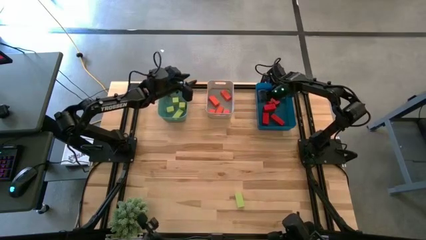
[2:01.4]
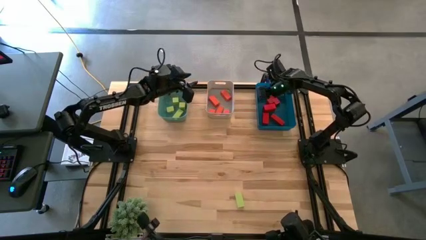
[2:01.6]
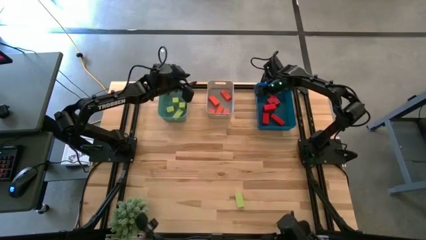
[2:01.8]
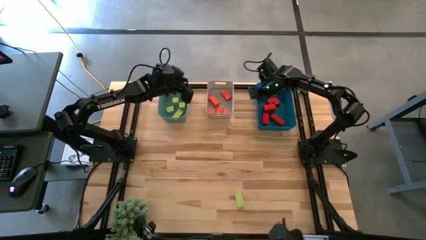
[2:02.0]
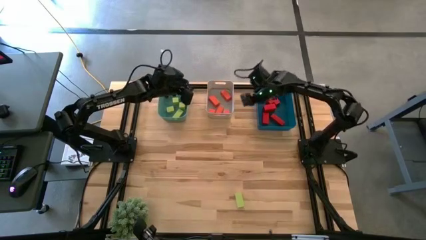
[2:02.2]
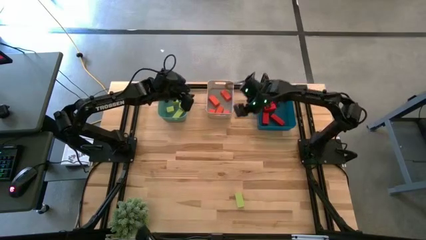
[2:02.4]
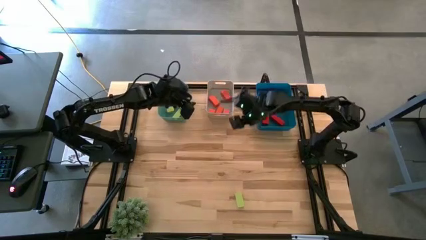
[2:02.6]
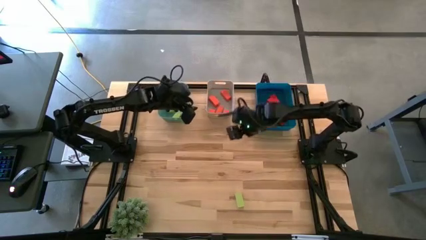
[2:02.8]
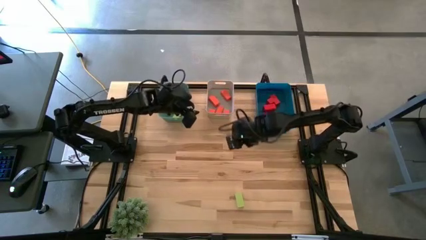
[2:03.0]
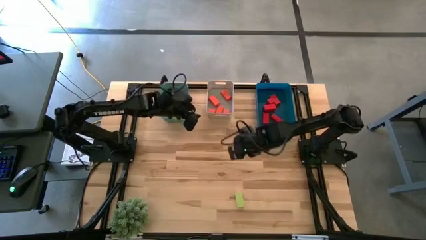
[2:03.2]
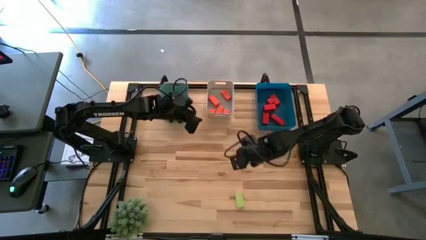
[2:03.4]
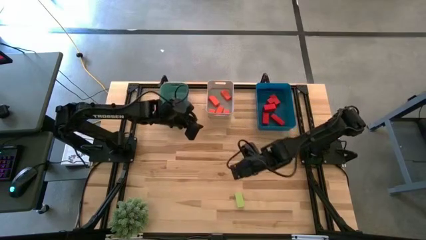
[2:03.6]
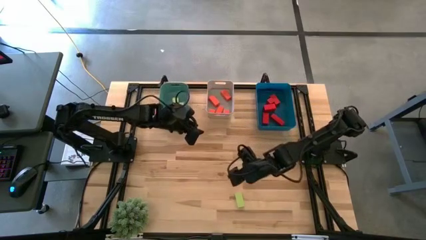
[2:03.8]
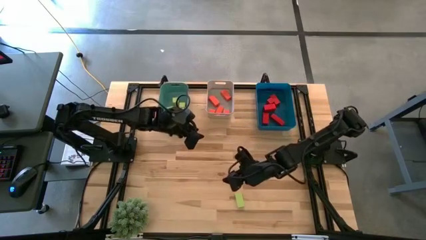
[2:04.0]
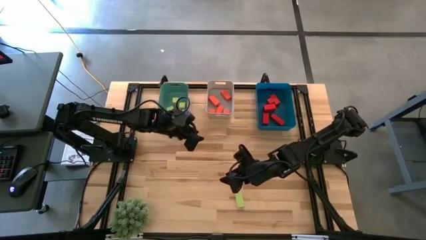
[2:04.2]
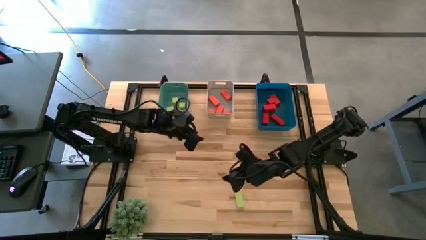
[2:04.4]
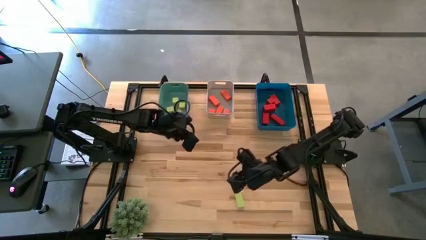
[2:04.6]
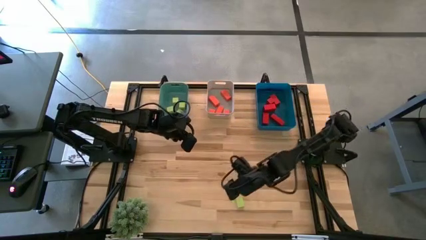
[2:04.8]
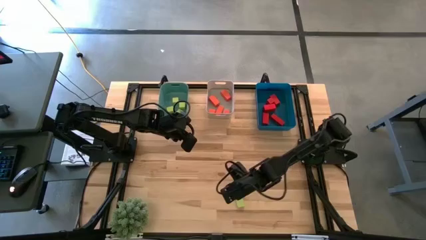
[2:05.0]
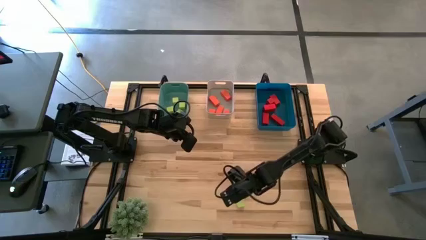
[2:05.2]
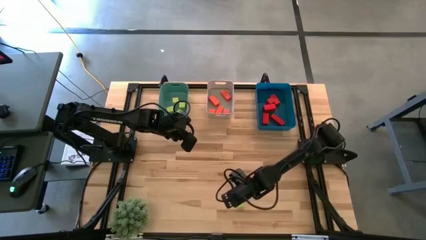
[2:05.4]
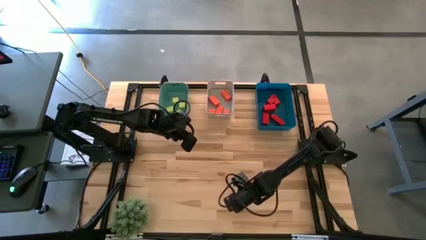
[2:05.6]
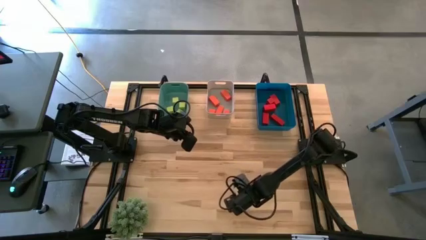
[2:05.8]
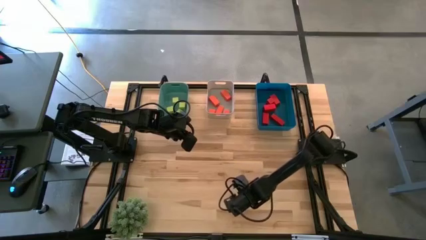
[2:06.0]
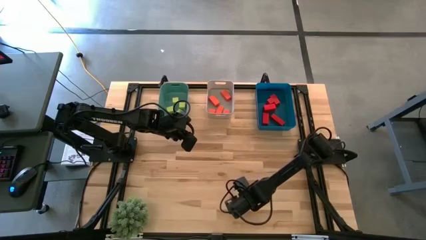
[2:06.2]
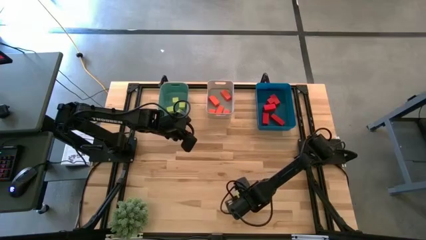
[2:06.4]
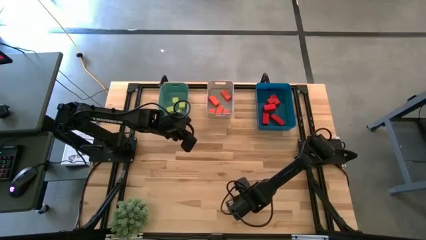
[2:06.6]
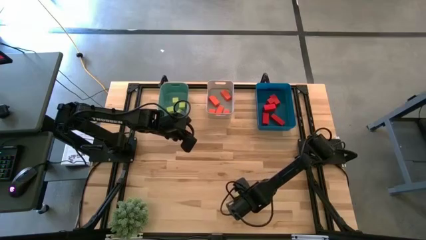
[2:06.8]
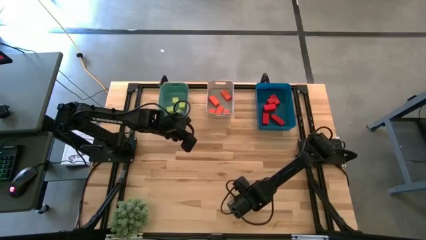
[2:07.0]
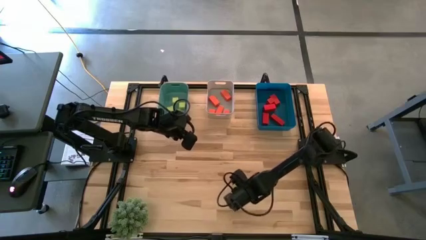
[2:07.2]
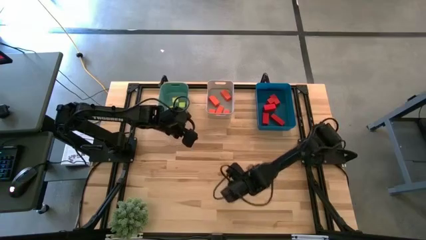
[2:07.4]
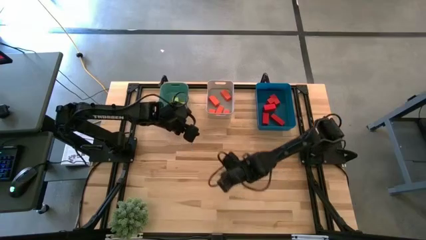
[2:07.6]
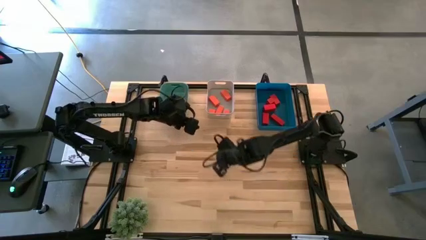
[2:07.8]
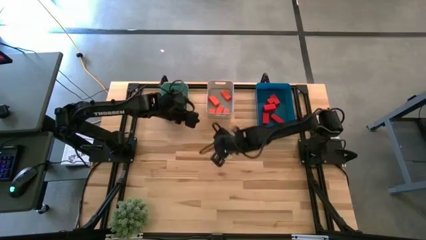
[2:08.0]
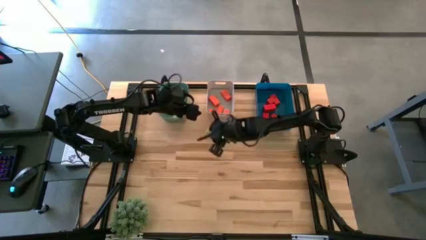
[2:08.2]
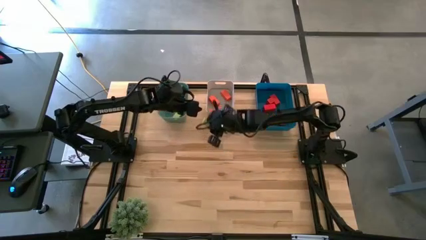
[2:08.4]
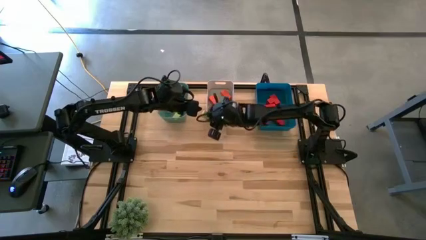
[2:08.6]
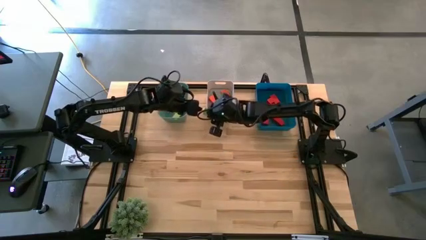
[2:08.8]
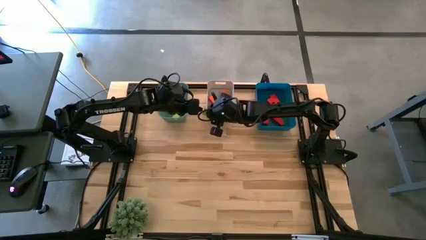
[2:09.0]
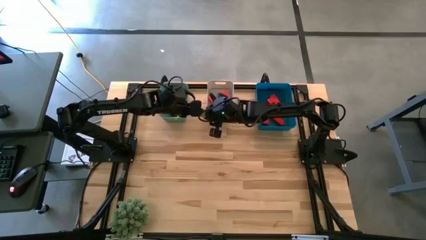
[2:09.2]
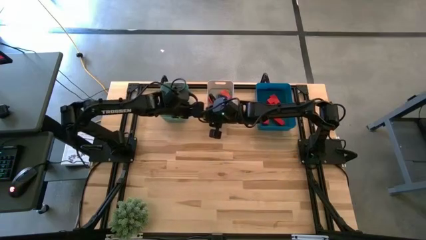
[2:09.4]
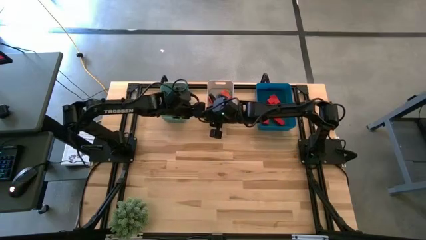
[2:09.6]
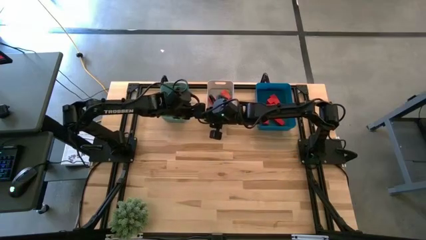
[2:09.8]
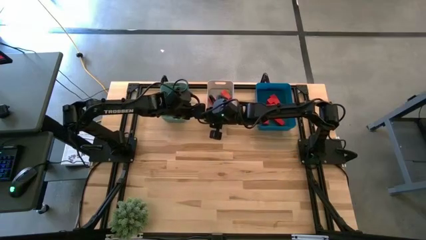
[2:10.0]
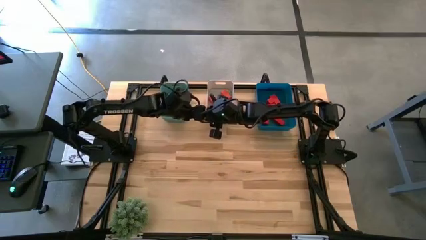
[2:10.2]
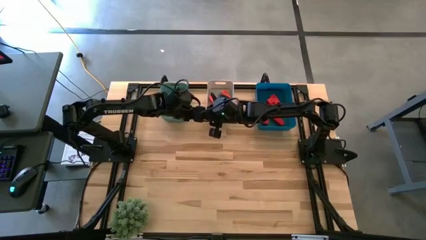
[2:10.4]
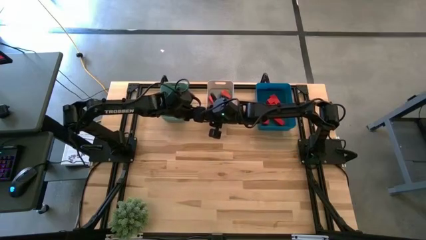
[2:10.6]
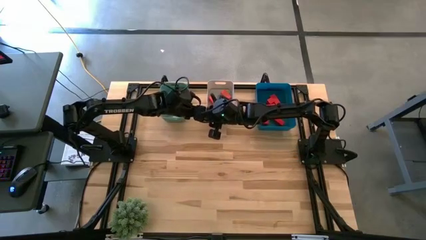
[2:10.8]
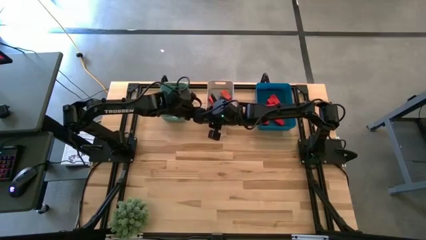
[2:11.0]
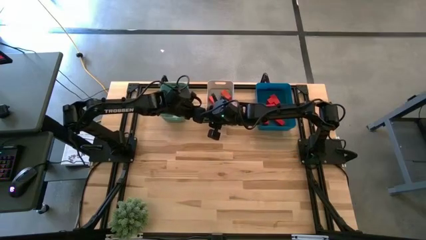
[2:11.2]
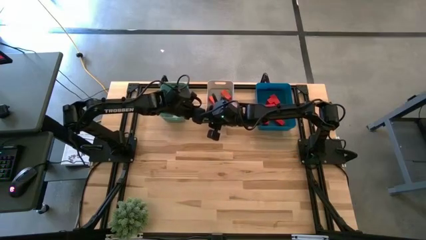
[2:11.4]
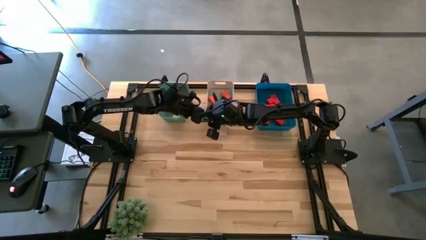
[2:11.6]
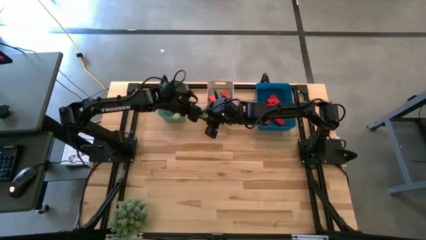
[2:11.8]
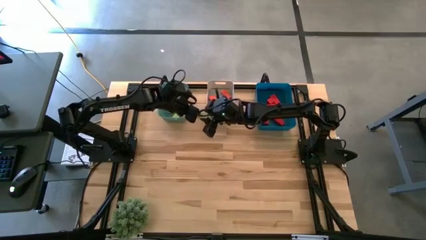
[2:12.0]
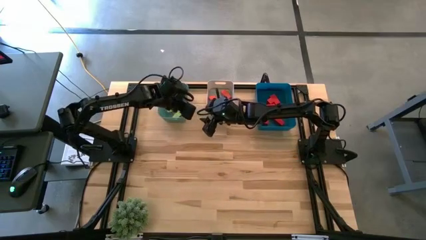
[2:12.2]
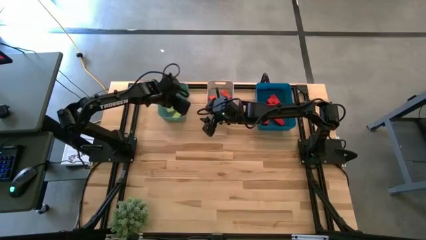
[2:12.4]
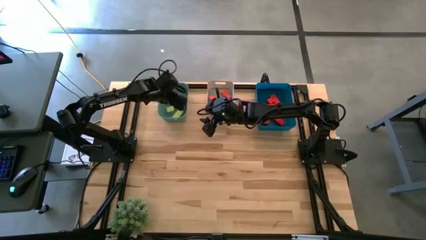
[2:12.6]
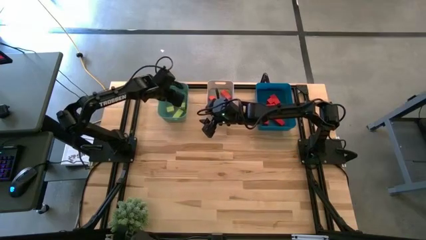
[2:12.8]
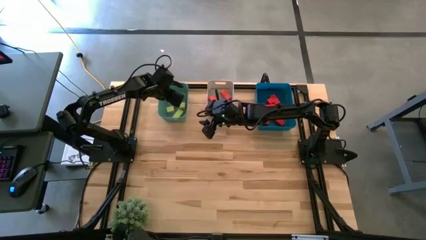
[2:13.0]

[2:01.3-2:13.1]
Task: Sort & place blocks by color
Put the green block into the green bin

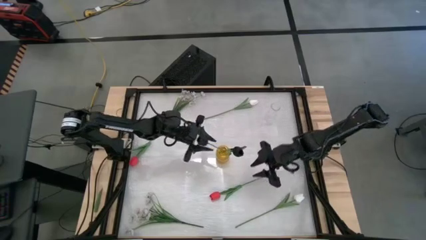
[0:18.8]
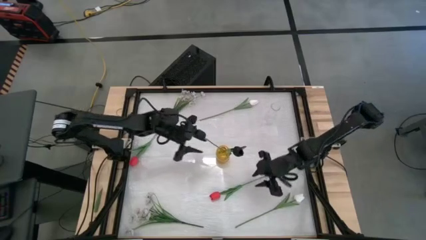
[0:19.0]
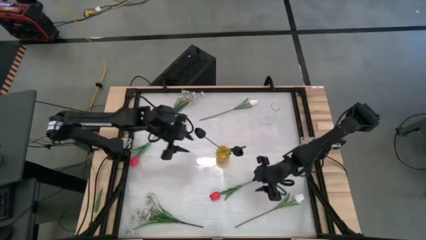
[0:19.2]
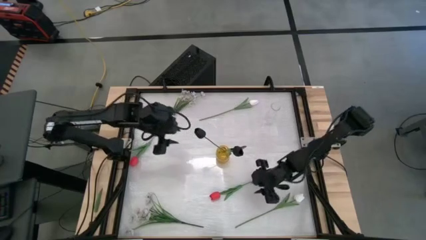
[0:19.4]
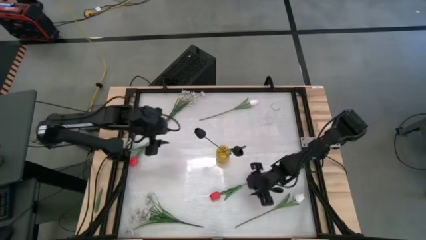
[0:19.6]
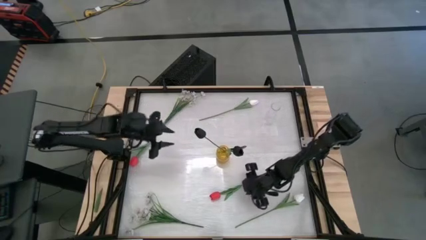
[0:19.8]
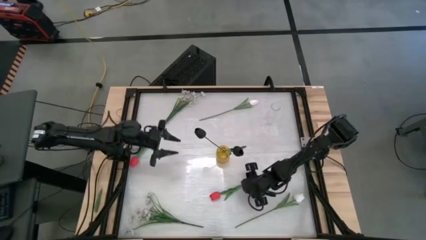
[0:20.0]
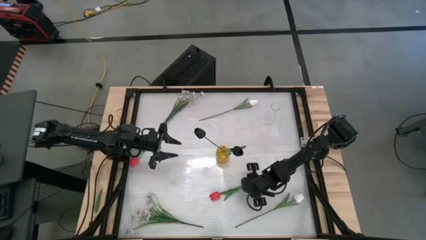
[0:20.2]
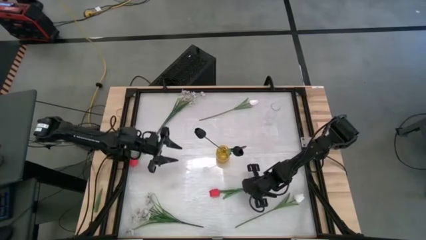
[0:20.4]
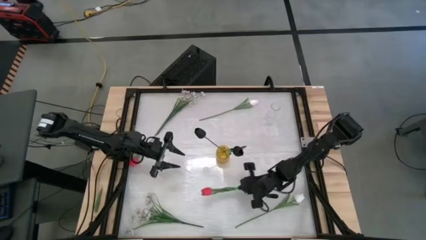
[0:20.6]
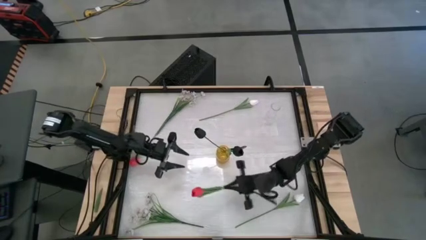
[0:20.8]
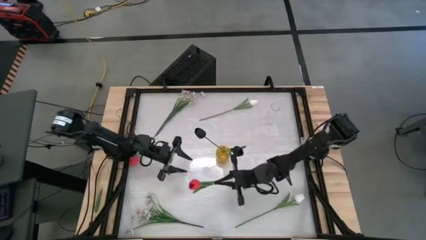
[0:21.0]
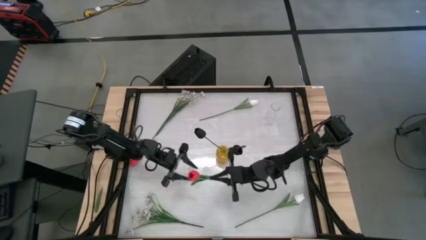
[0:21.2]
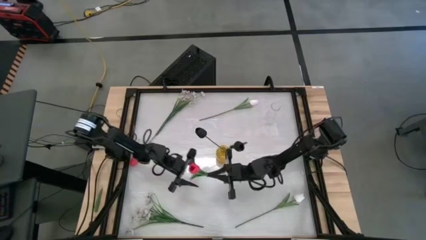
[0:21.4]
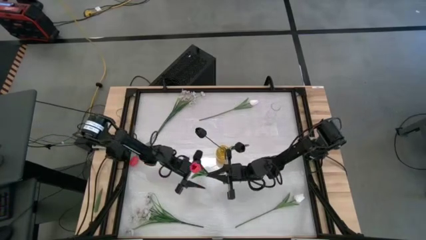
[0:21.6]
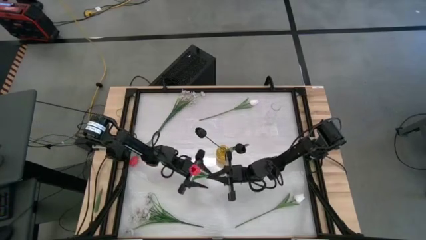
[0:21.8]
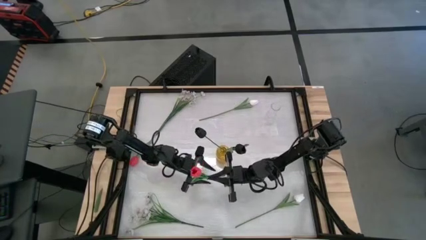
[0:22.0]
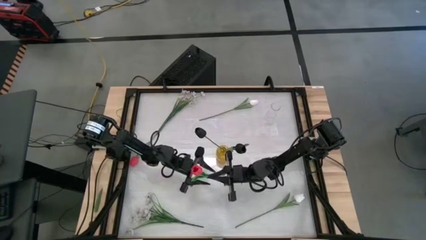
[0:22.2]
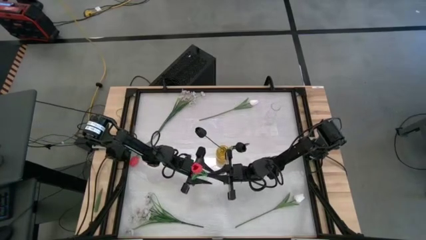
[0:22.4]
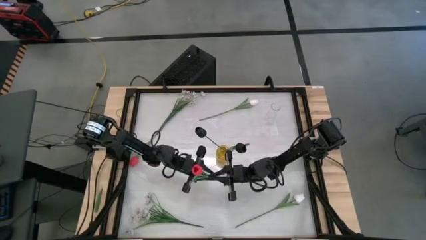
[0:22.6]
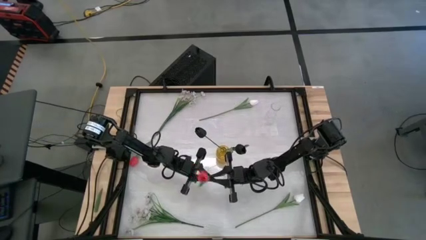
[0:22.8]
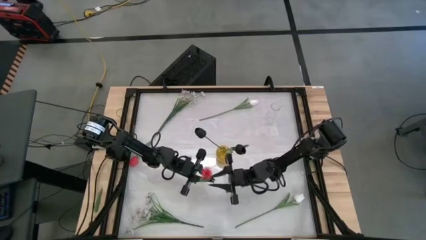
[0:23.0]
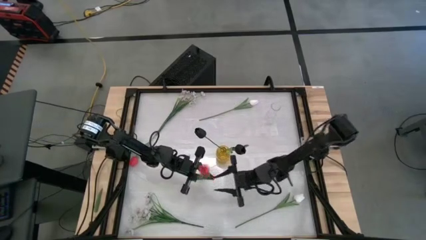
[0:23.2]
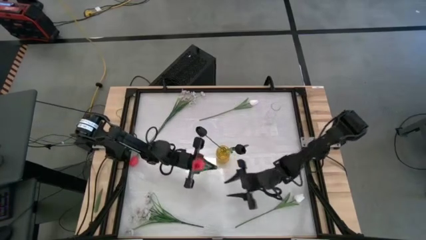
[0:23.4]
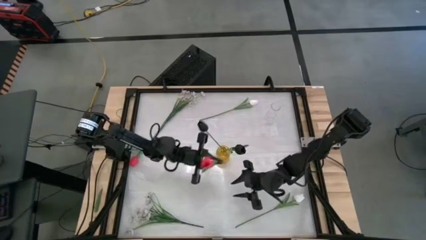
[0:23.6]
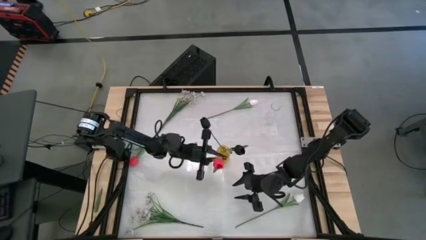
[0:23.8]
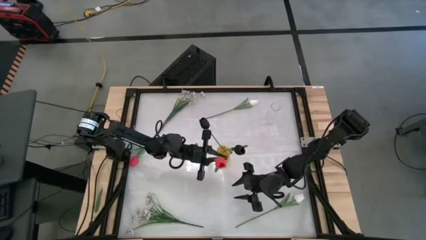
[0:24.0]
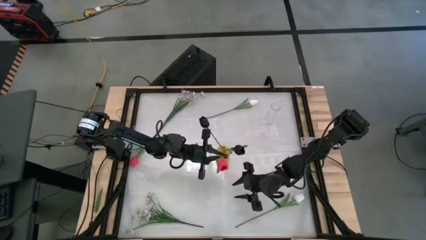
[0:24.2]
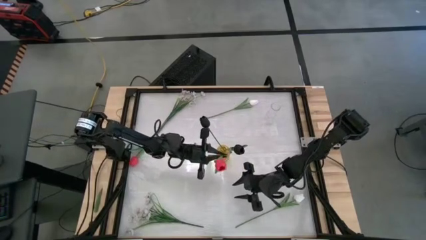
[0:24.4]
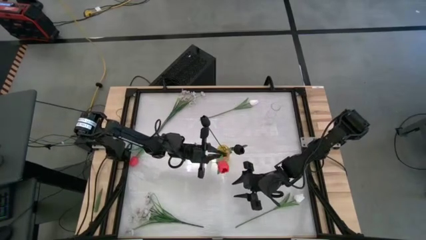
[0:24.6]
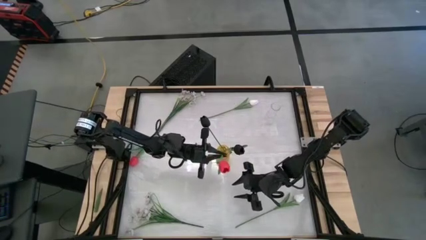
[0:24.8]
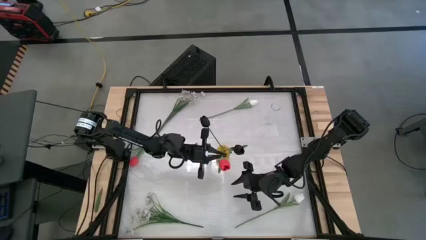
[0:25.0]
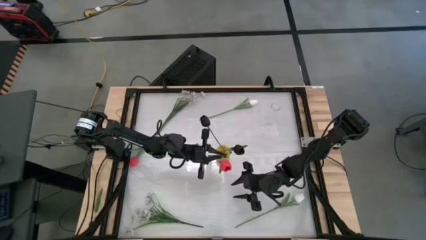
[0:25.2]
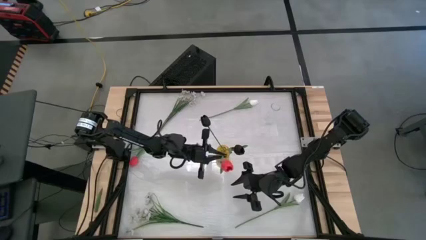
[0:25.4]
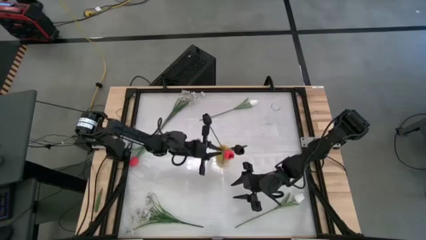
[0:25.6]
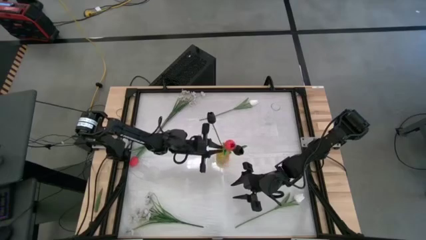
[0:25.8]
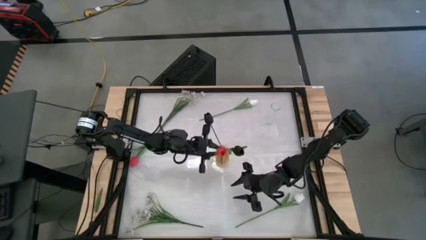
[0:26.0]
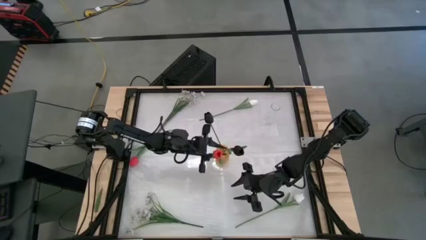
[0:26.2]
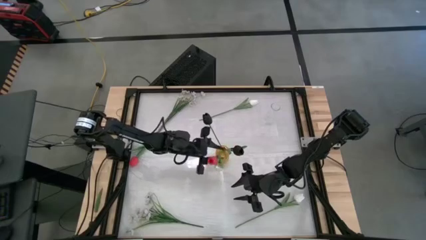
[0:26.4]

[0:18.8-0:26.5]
Task: Sort flowers into vase by color
Put the bottom red tulip into the yellow vase
